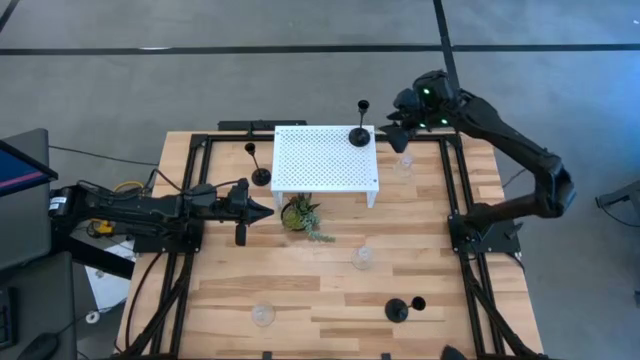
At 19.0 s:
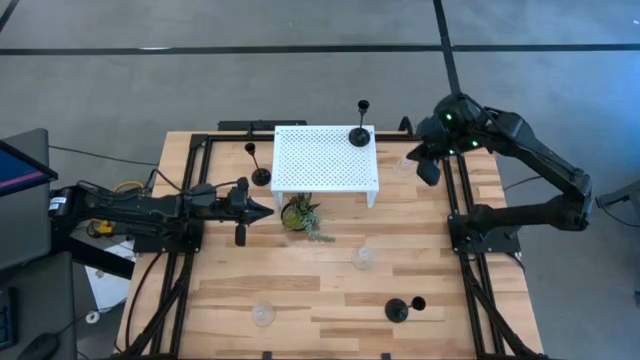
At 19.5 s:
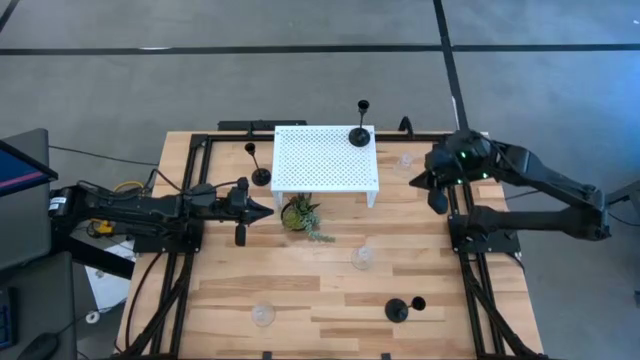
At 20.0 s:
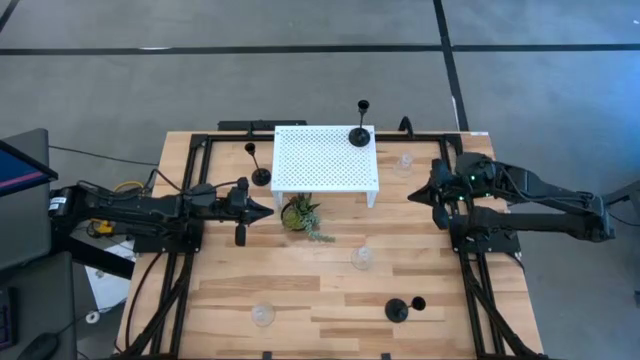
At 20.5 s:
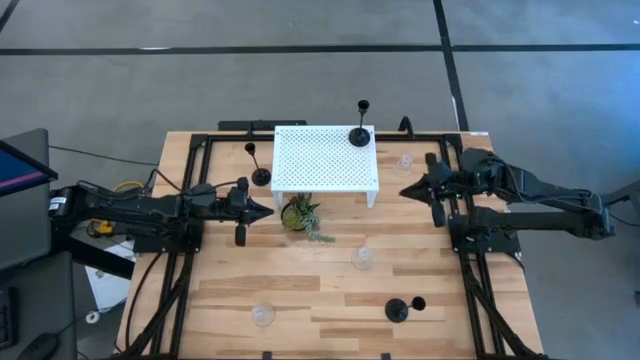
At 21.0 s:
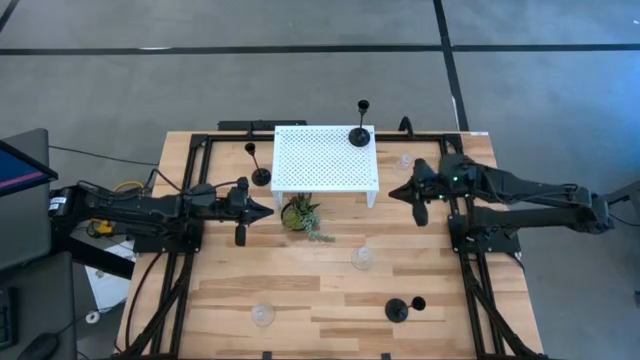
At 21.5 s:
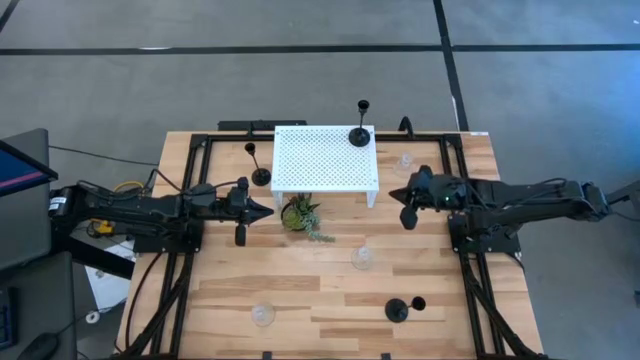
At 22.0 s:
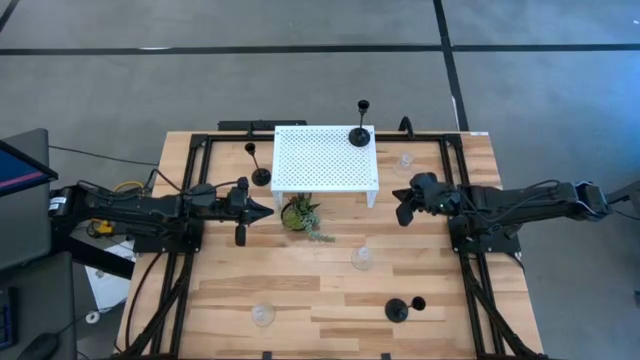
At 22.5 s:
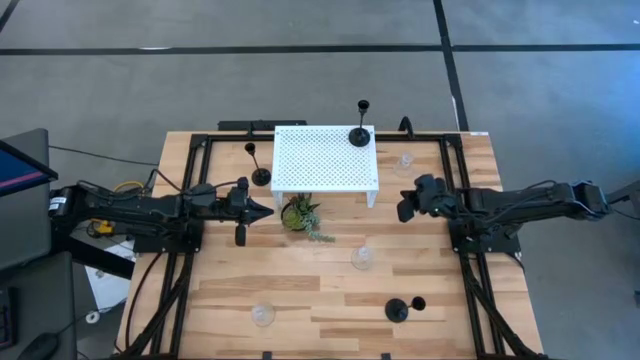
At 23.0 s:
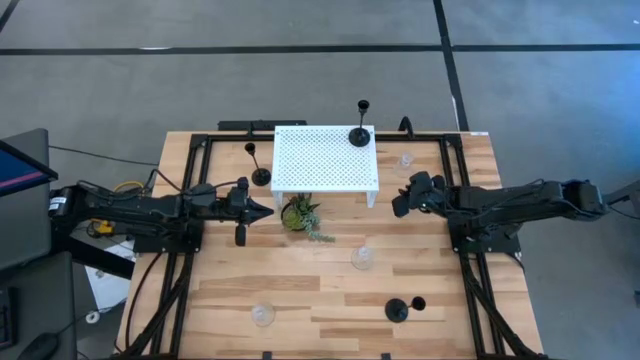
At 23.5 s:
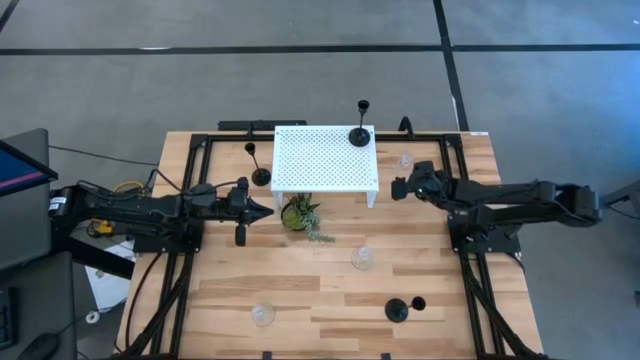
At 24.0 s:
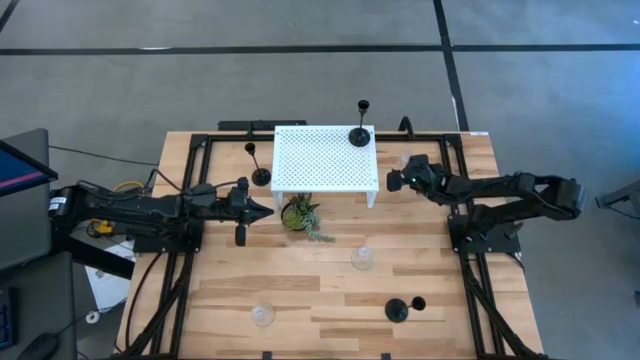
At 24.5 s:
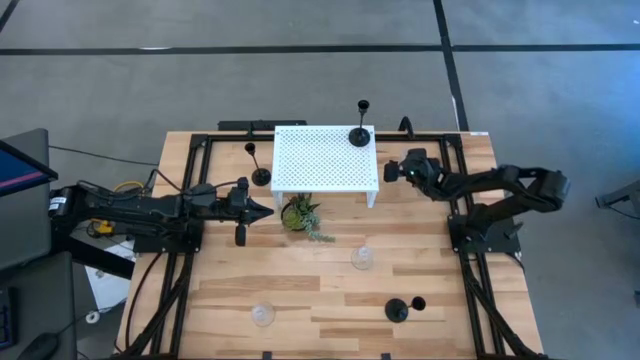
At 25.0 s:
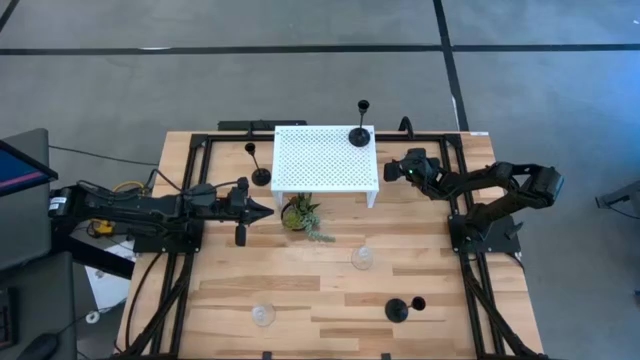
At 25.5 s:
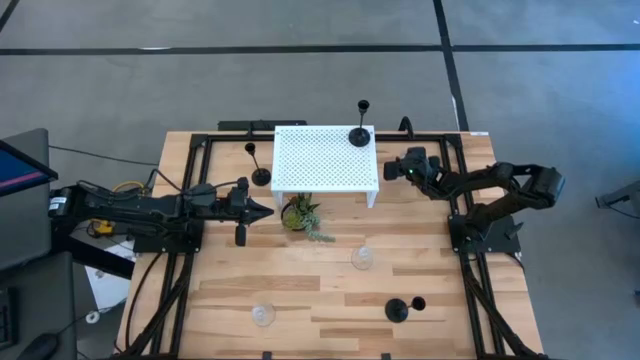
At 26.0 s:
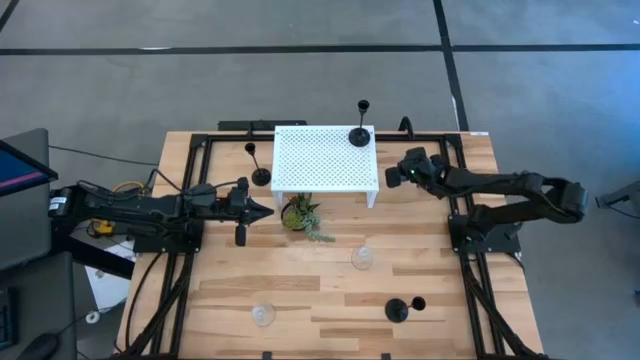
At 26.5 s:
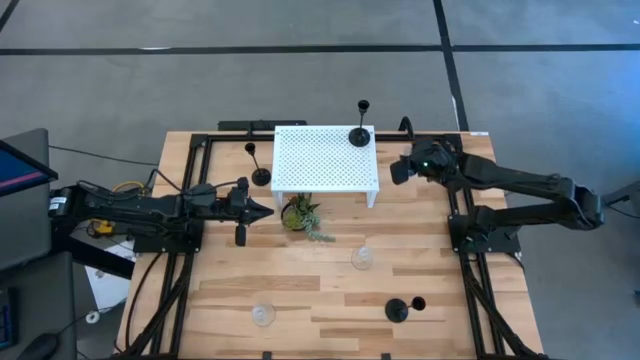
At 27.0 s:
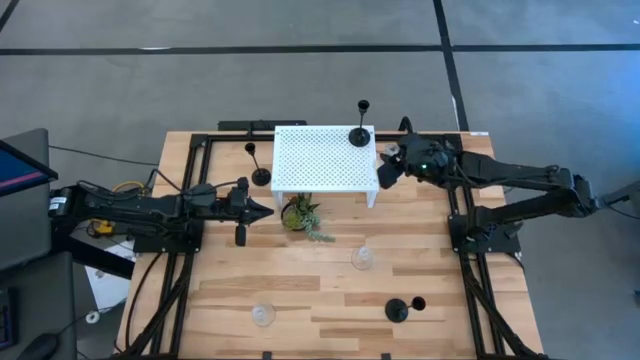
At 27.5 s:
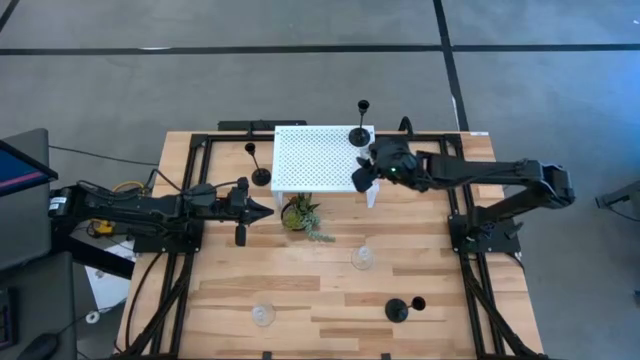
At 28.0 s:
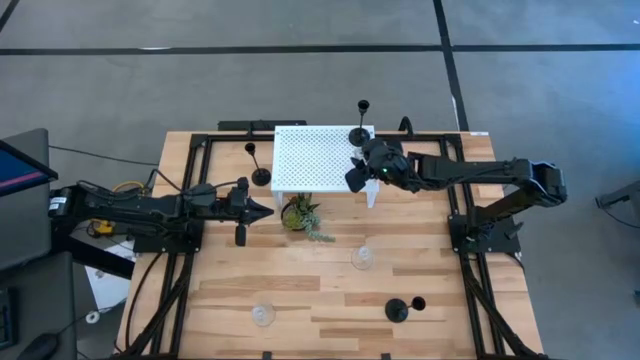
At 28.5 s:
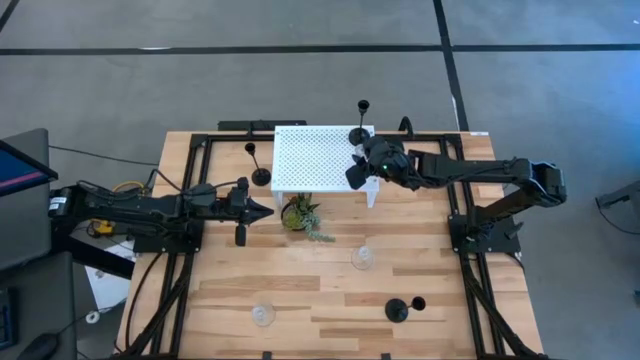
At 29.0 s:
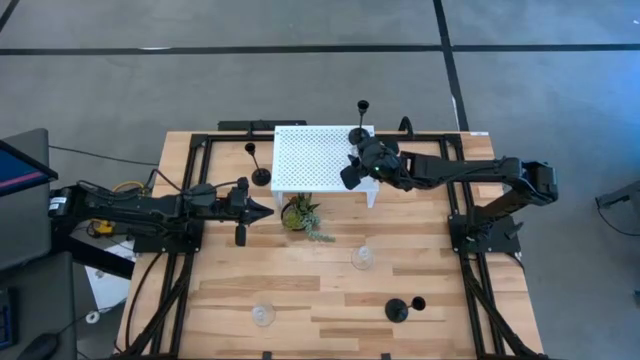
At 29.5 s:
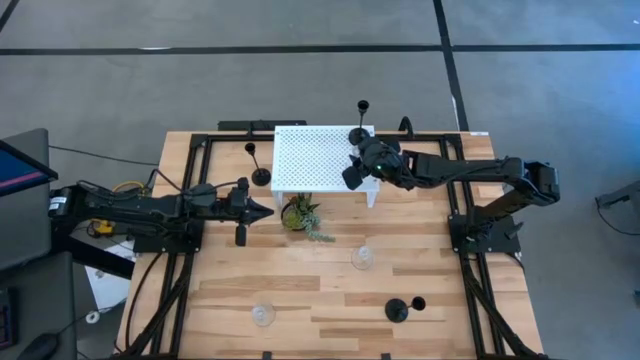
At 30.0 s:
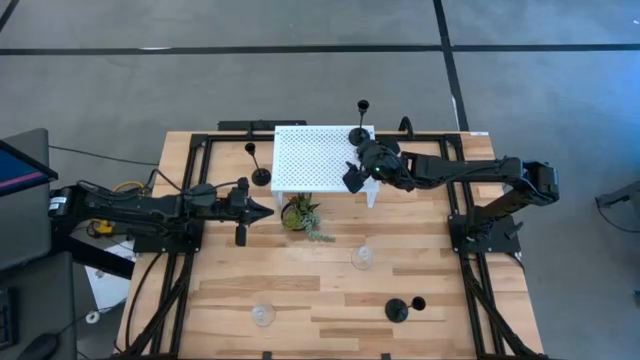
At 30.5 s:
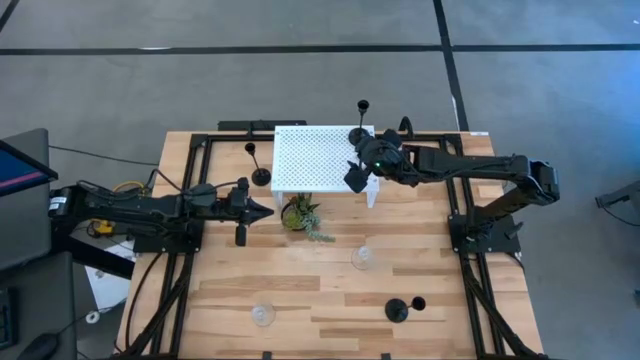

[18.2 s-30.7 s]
Task: Pick & Place candle stick holders
Put the top right transparent glass candle holder on the shelf

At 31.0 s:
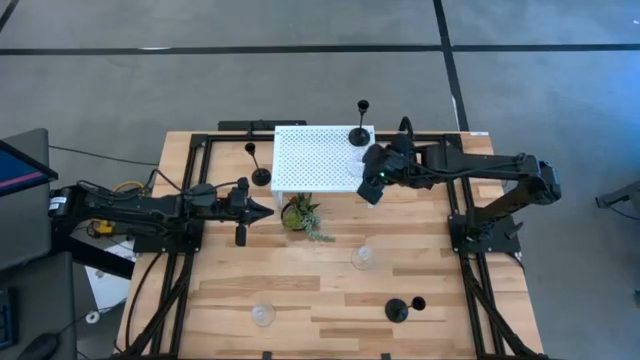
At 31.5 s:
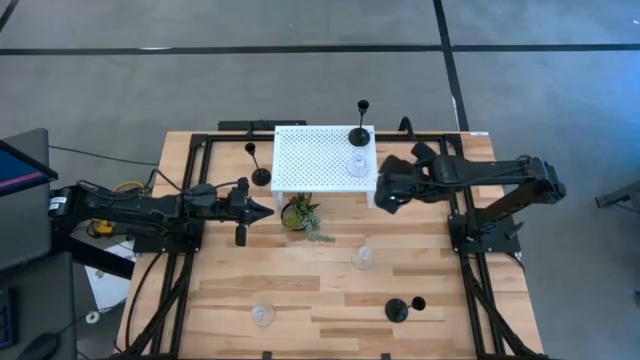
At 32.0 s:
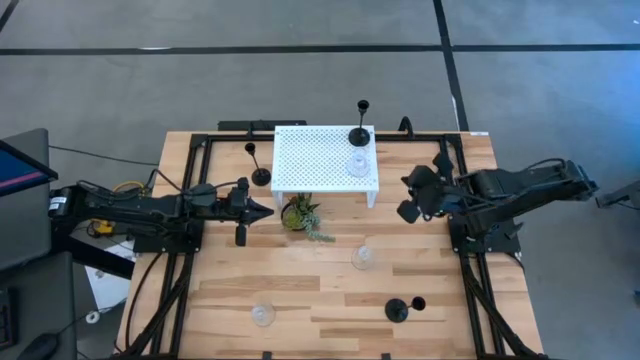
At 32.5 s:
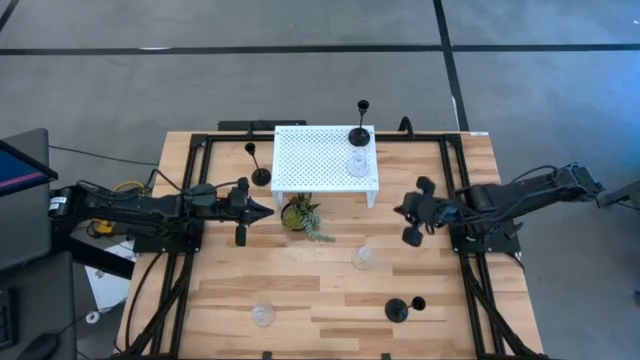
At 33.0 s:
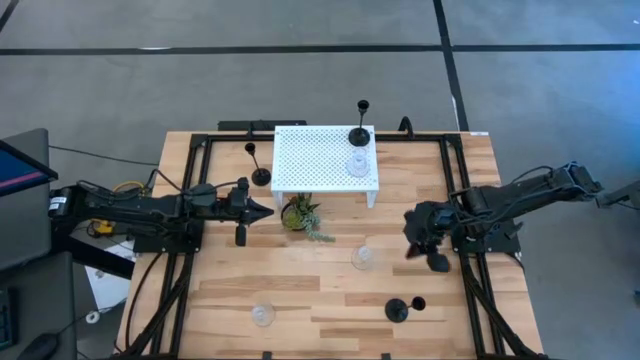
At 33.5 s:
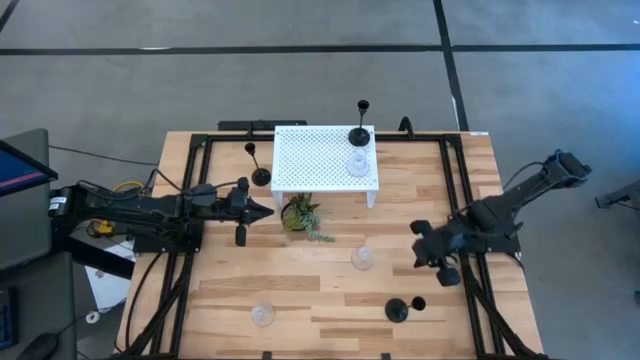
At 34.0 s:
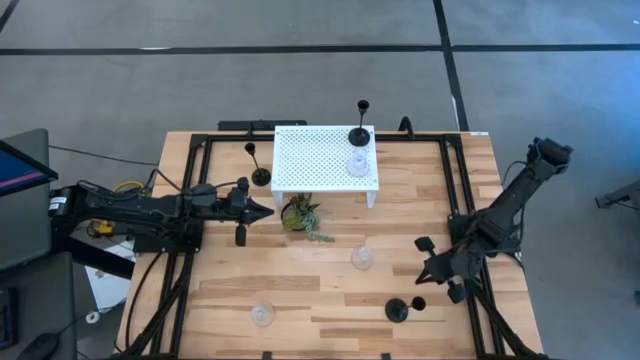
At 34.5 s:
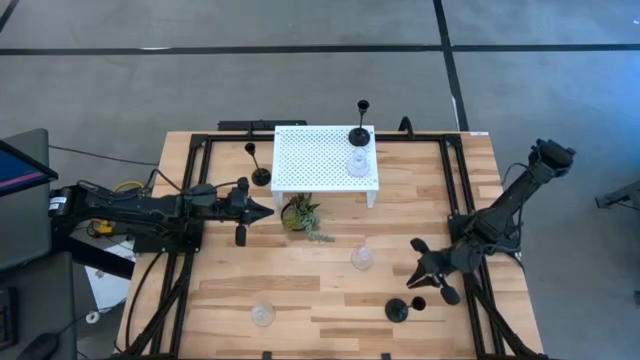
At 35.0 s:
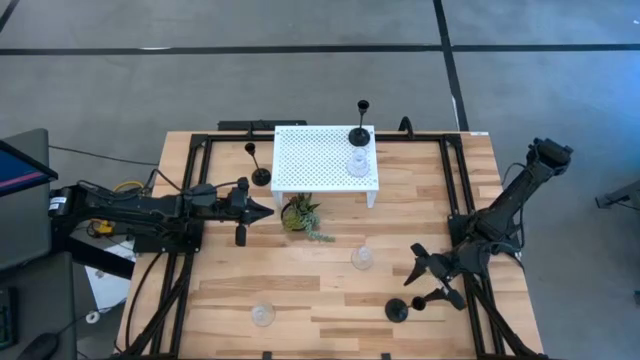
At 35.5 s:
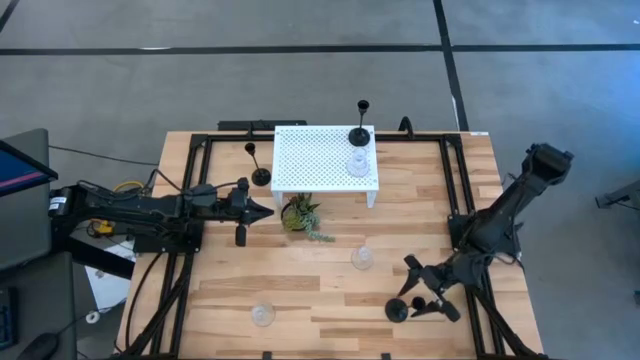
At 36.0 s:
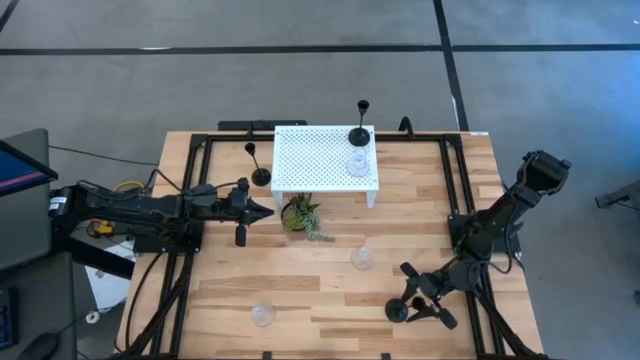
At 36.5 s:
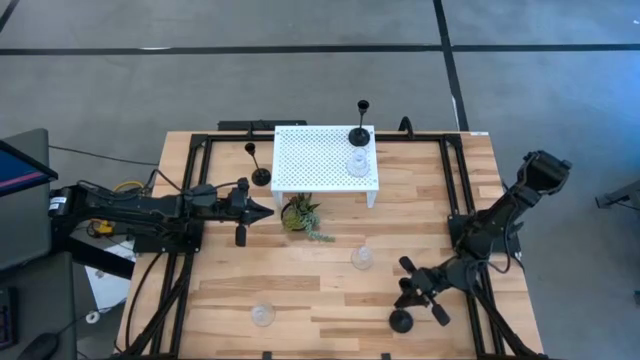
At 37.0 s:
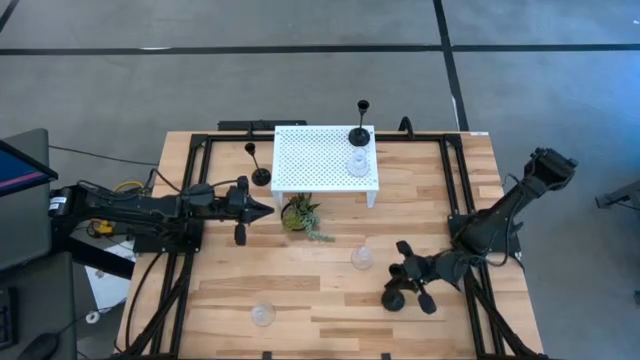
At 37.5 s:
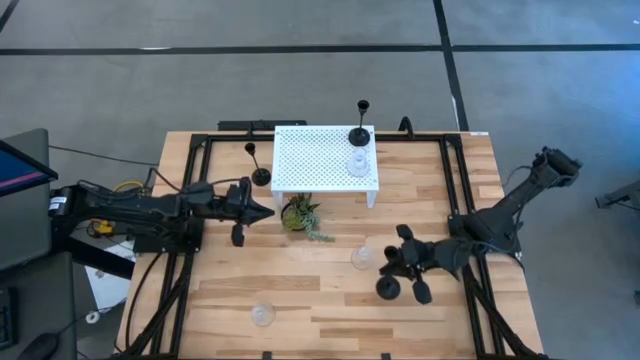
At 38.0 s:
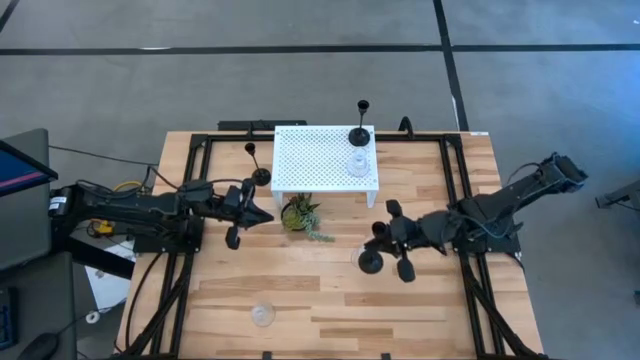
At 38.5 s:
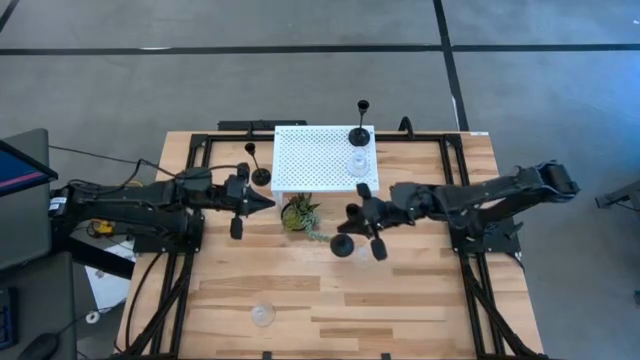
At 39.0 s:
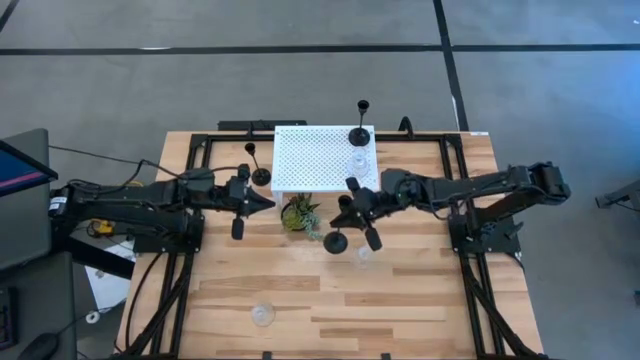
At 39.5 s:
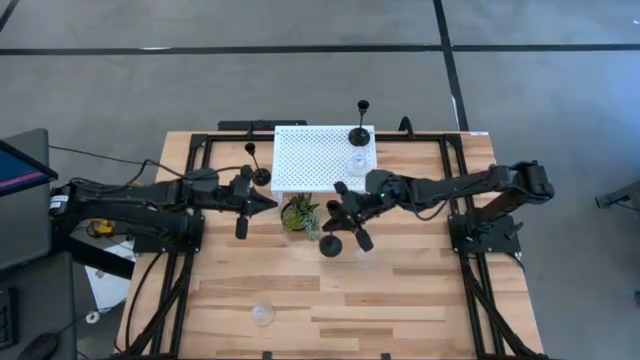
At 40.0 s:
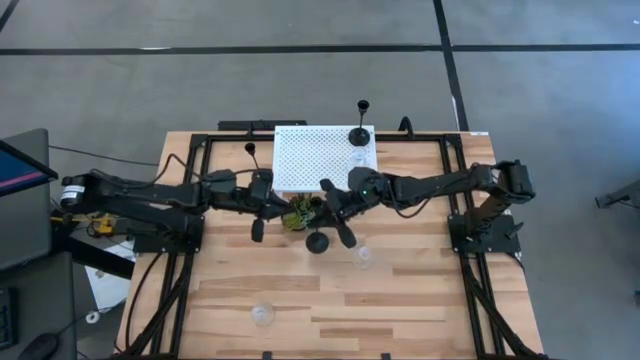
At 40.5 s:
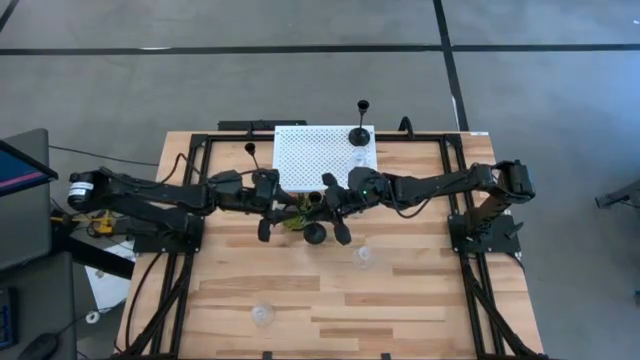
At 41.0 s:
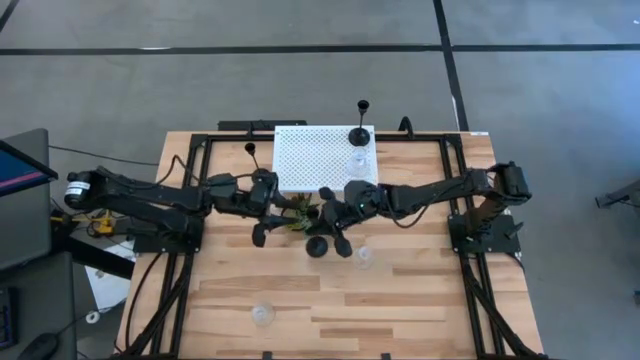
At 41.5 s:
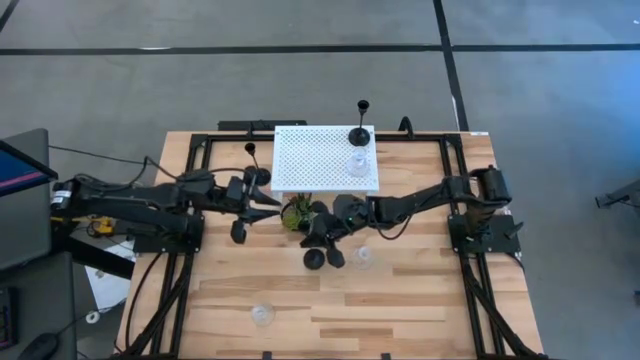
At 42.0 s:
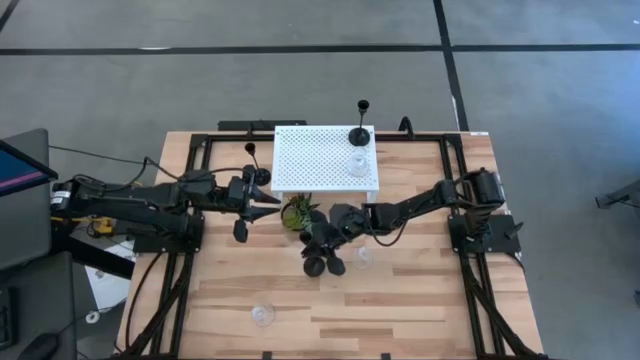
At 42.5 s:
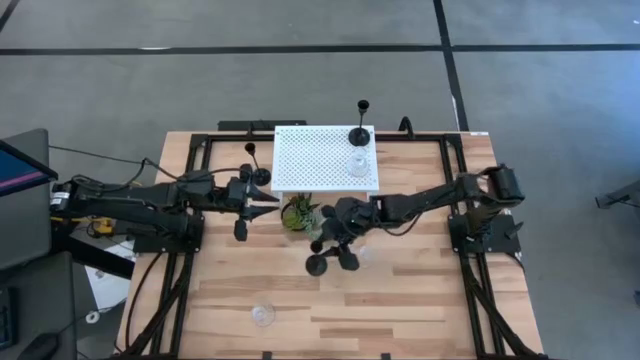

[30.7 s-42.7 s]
Move the bottom black candle holder to the center of the table
